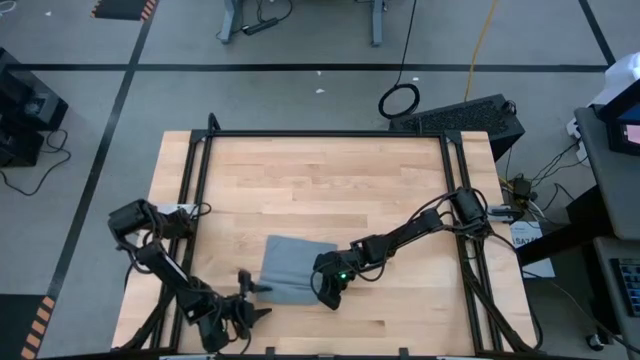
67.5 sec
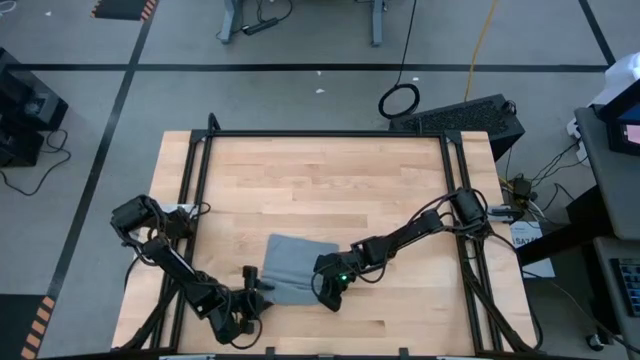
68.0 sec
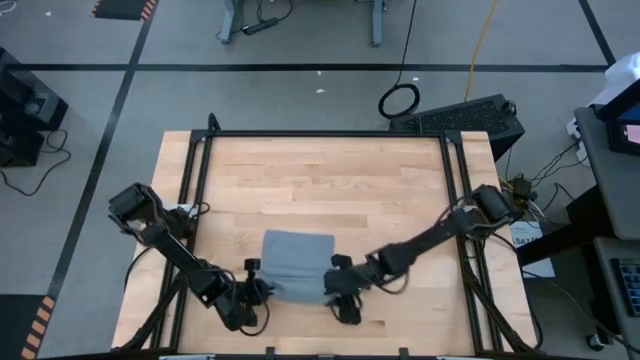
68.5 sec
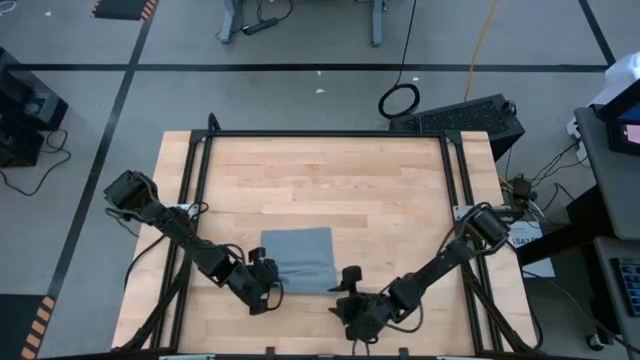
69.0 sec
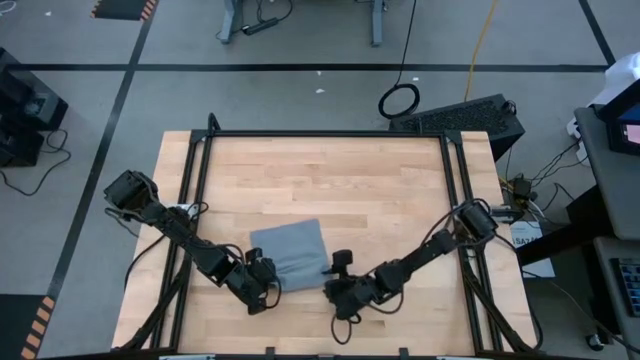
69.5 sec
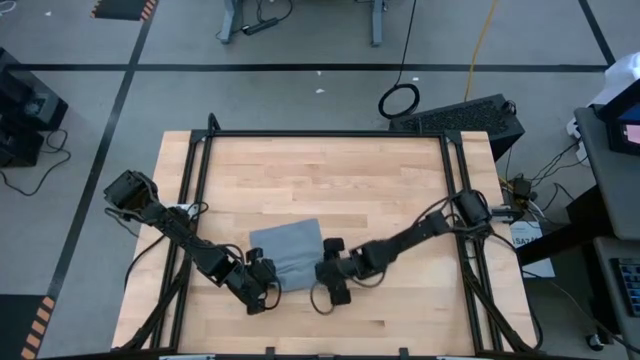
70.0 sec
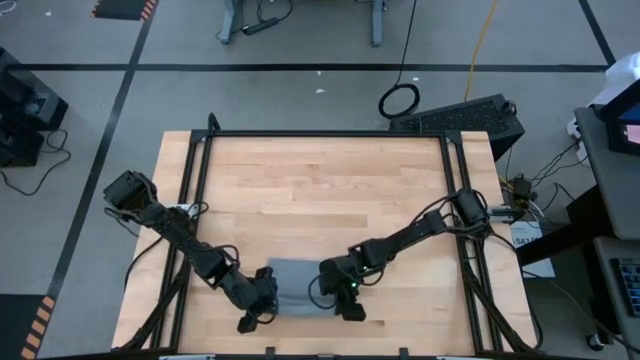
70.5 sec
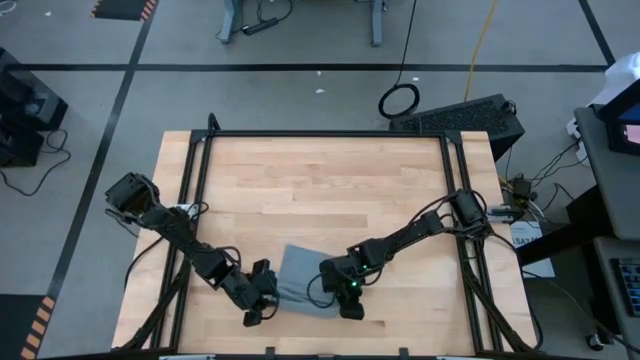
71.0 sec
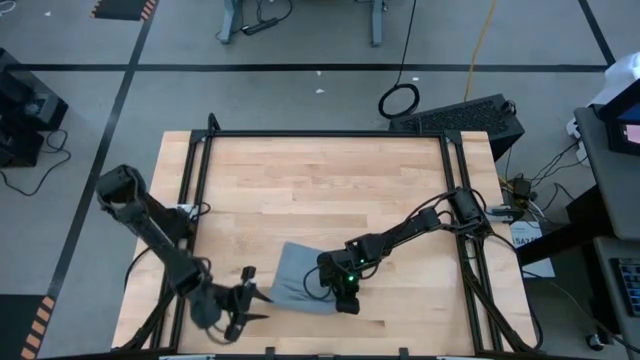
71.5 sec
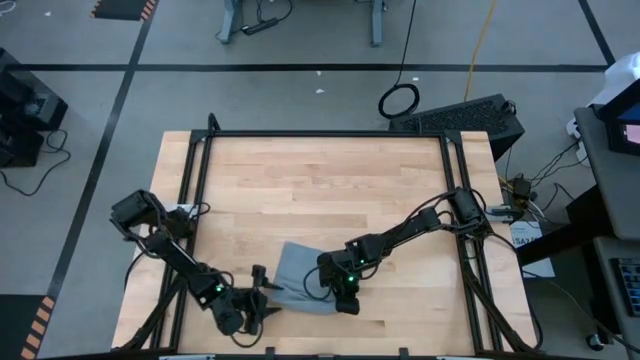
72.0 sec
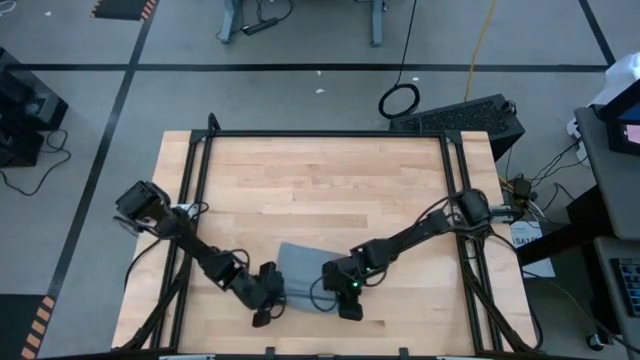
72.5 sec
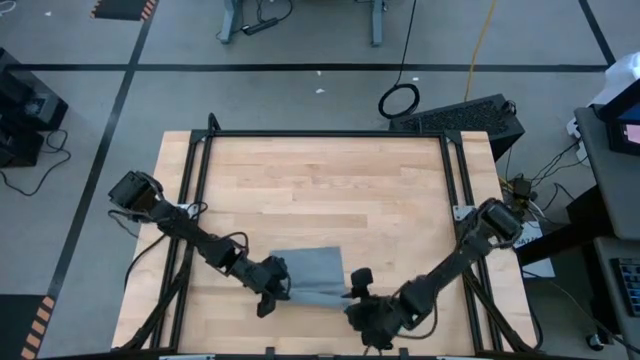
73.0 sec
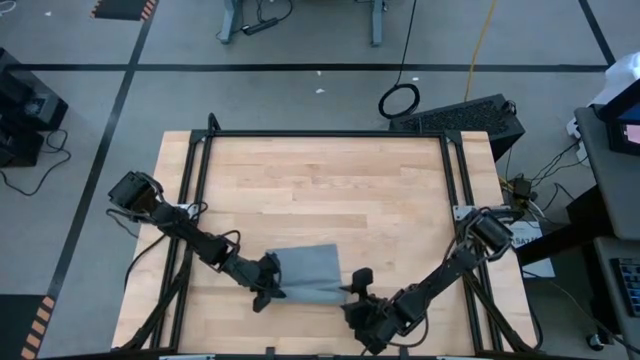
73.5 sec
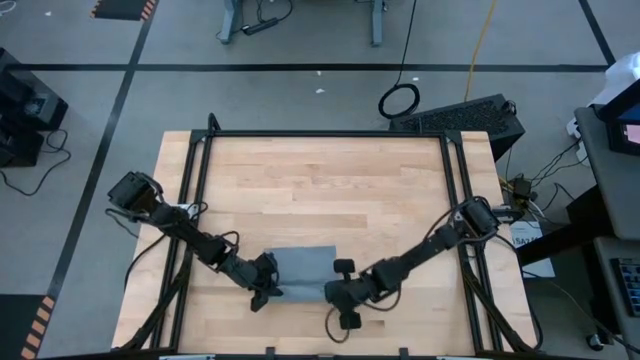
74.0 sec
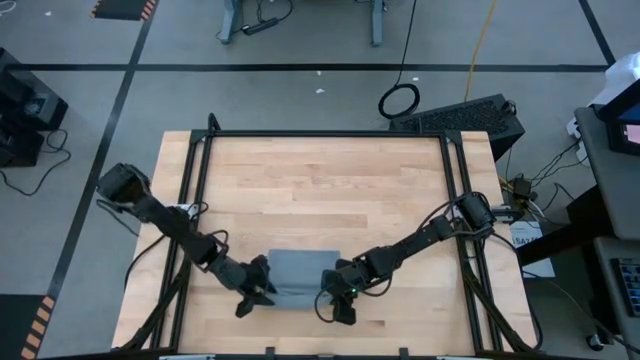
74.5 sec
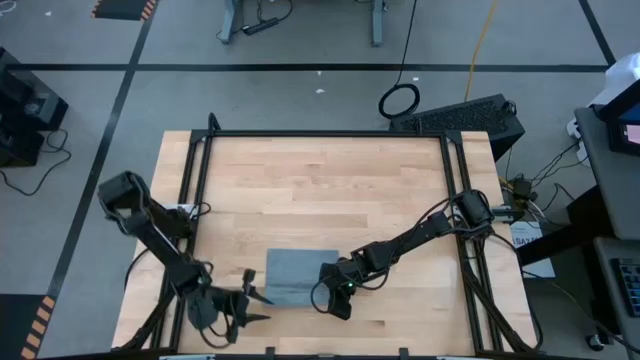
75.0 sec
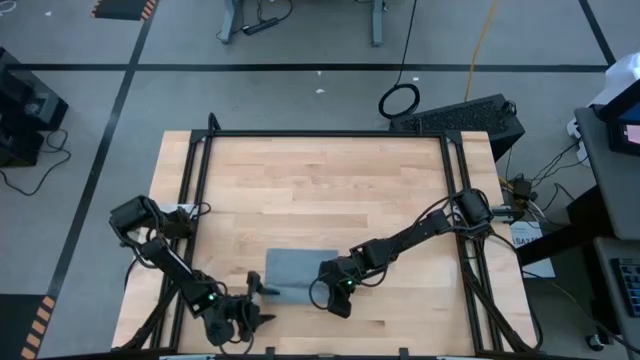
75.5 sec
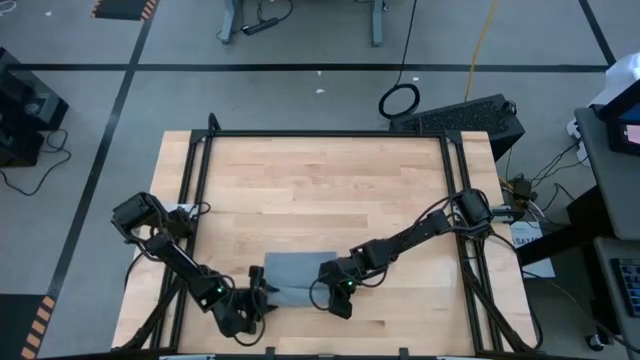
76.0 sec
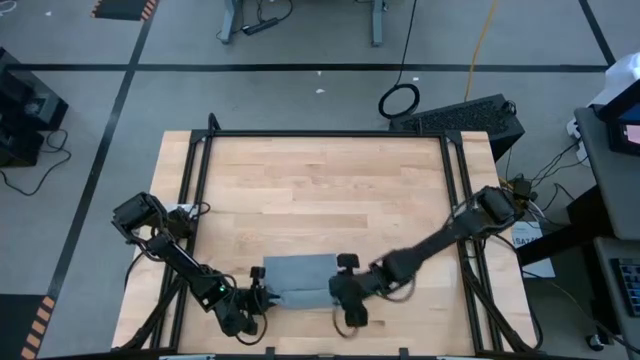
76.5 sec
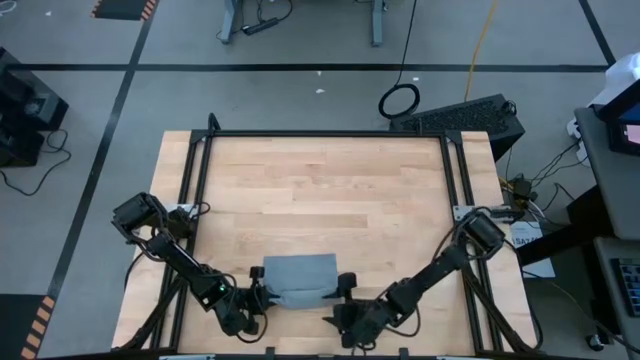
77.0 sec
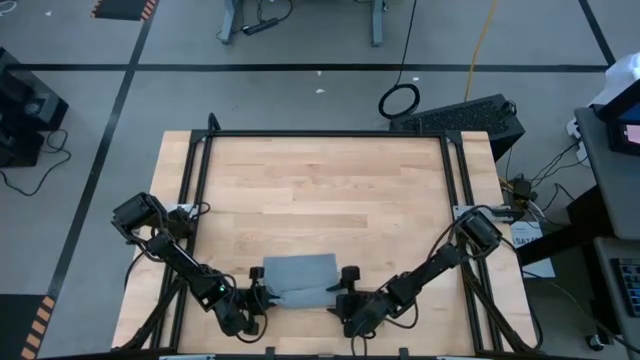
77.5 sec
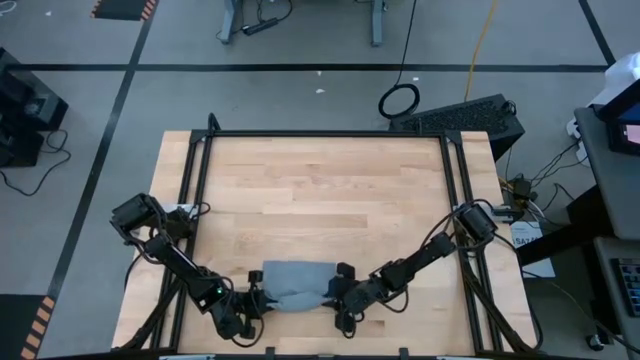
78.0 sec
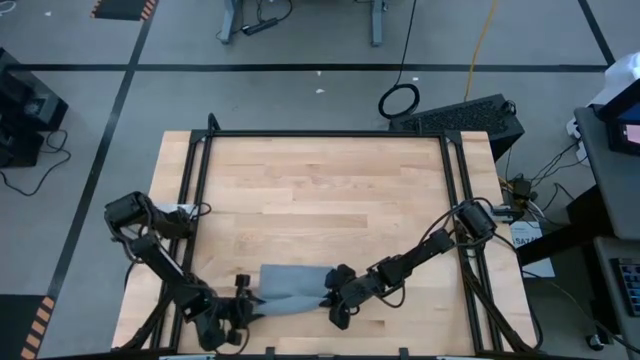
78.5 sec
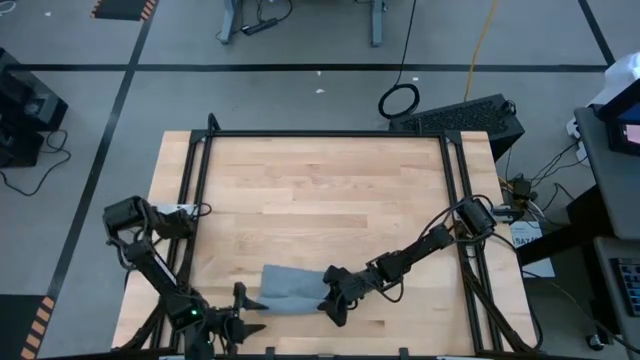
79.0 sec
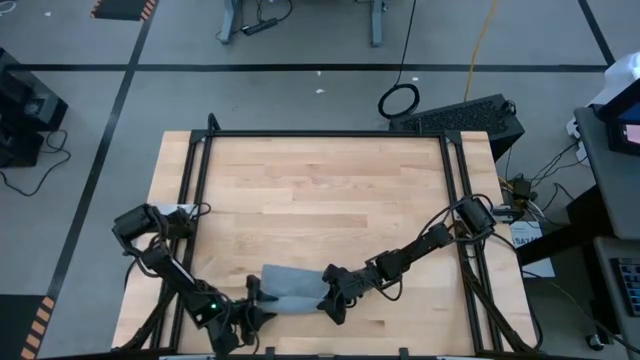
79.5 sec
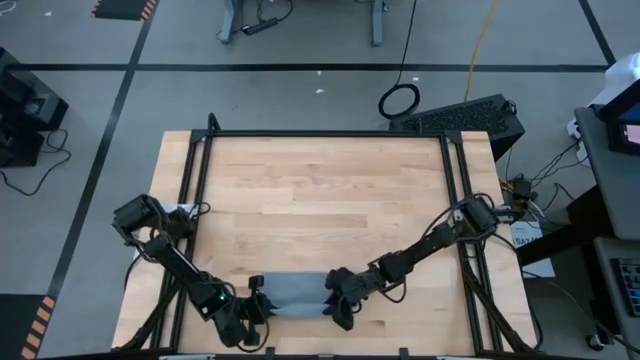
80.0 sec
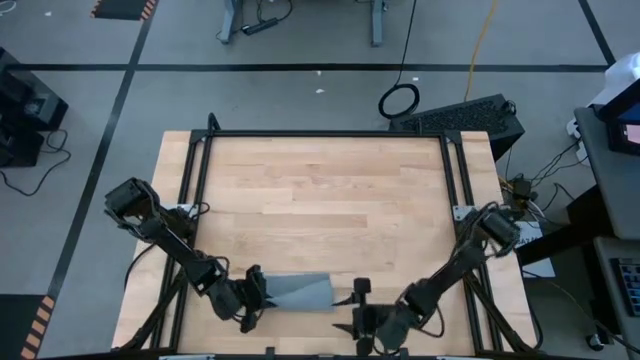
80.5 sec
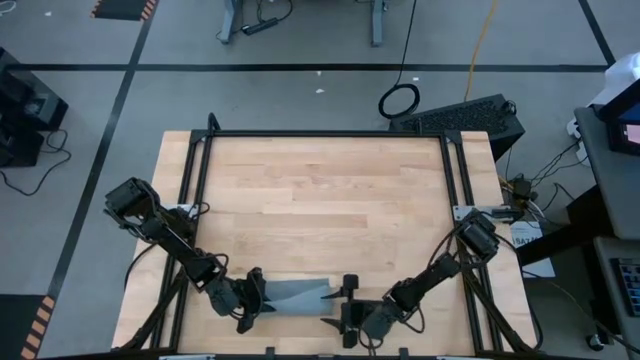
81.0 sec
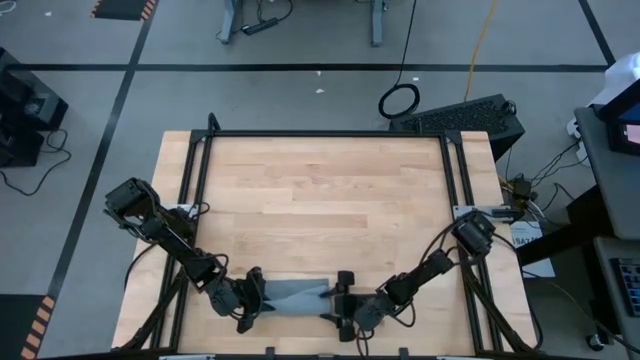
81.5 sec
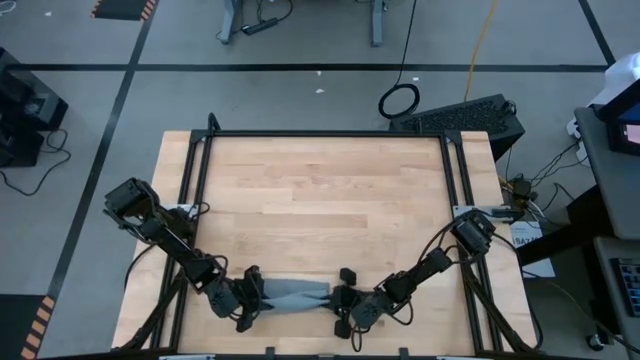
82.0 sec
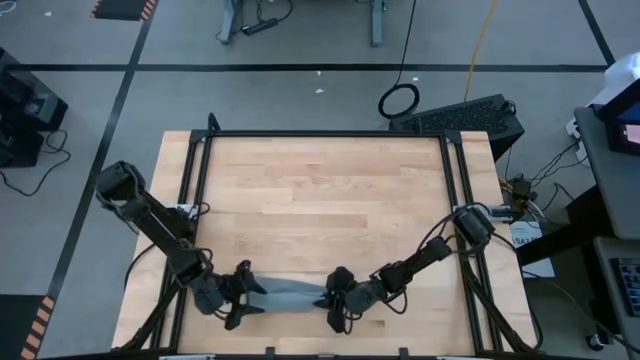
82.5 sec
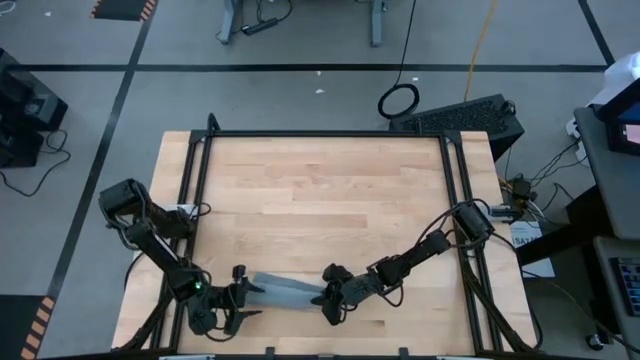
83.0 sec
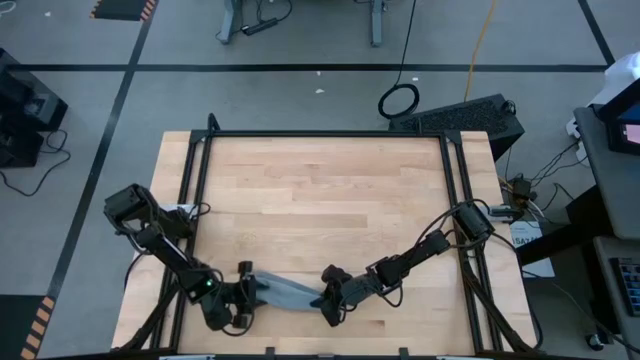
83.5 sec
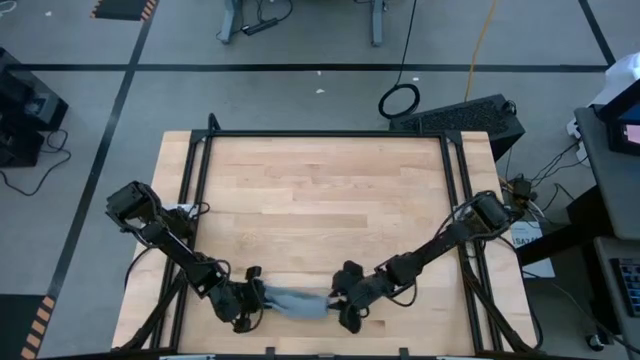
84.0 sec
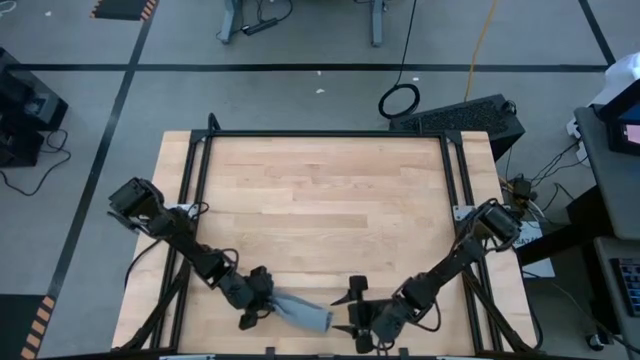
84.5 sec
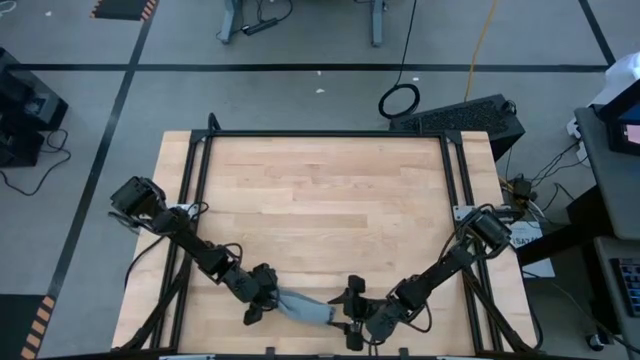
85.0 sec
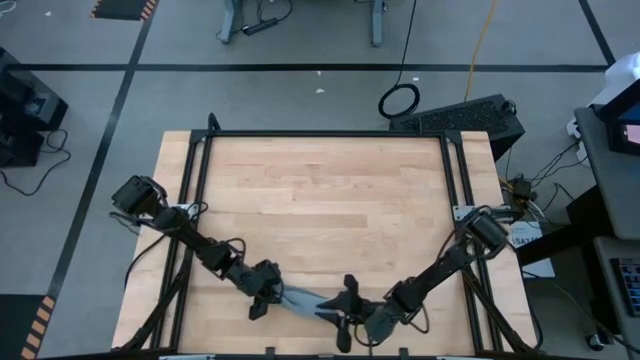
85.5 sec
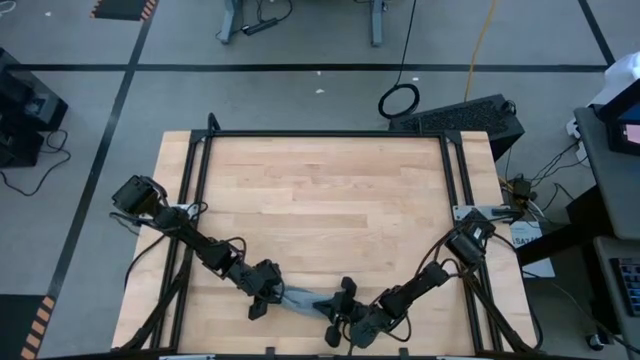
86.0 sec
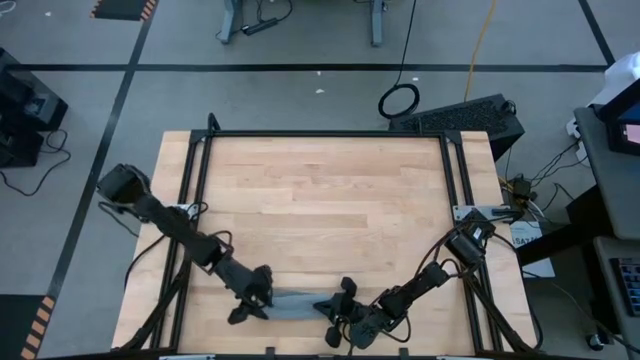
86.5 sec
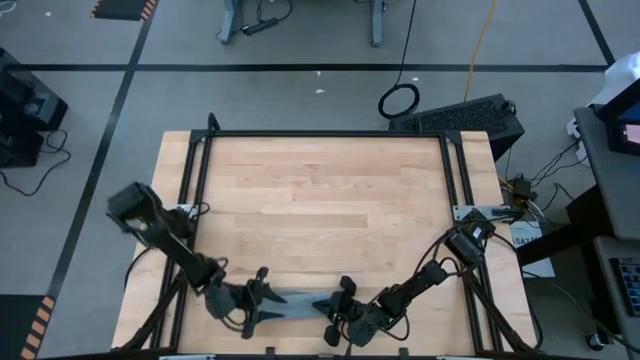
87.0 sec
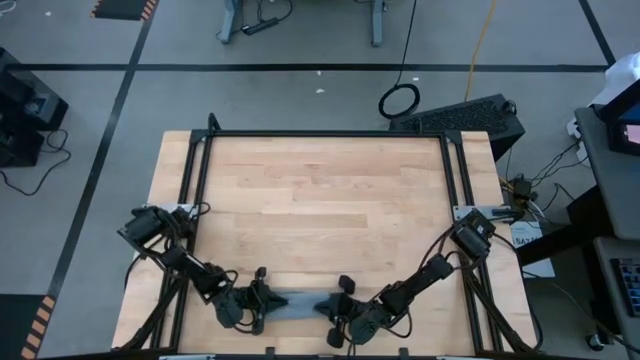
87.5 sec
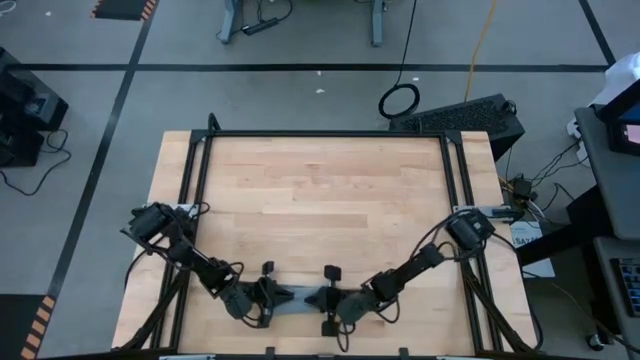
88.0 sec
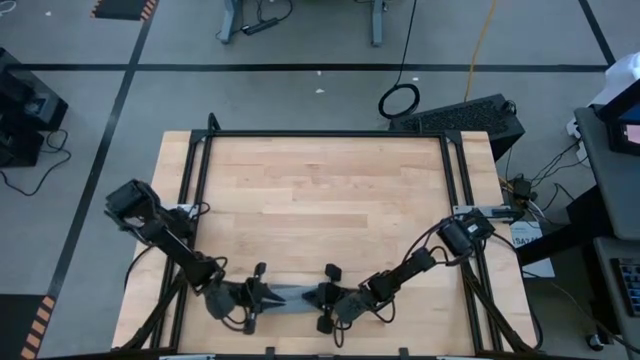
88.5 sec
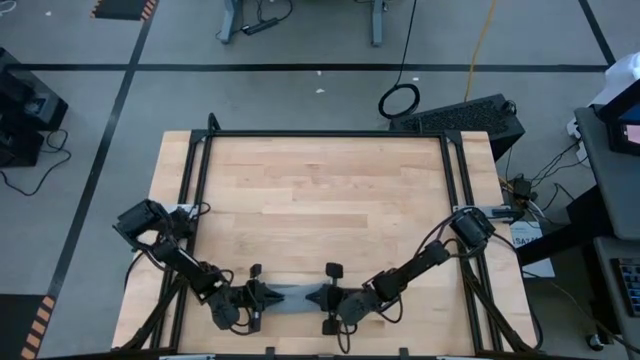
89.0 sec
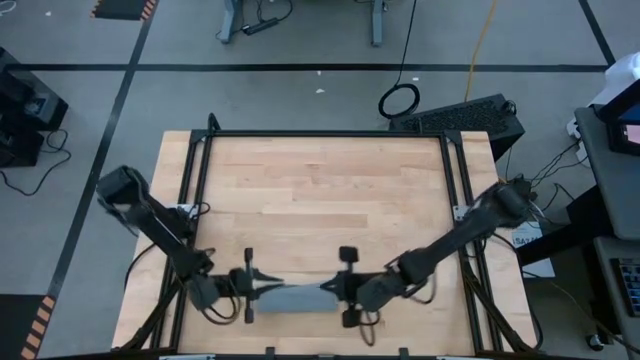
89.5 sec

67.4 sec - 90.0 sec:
Task: Roll towel
Roll the gray towel
